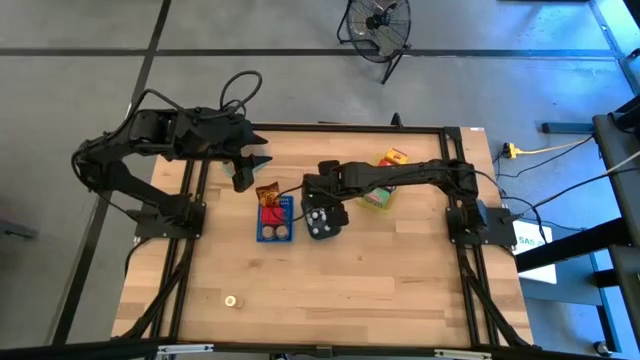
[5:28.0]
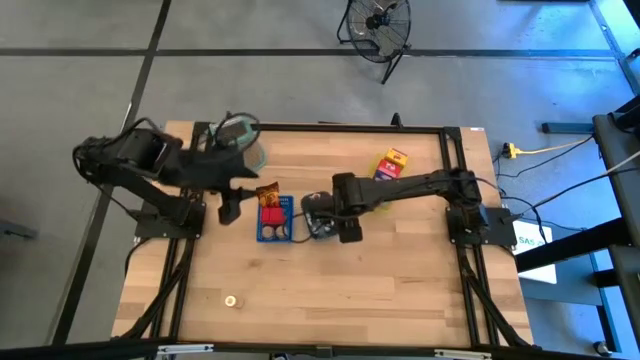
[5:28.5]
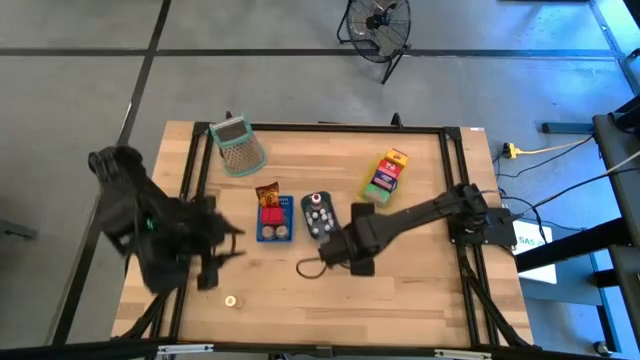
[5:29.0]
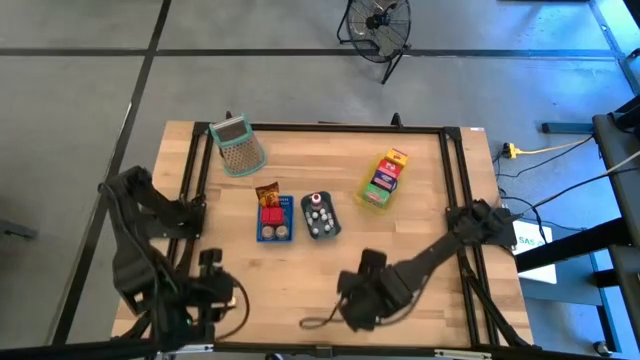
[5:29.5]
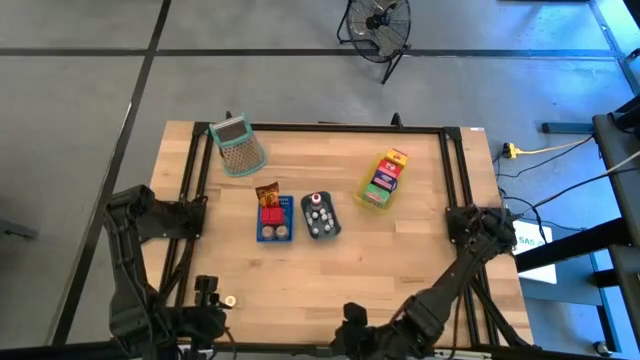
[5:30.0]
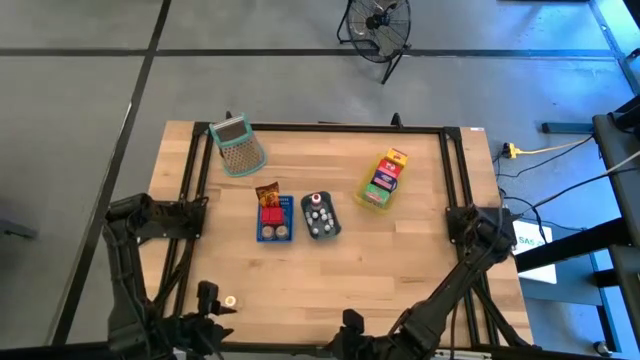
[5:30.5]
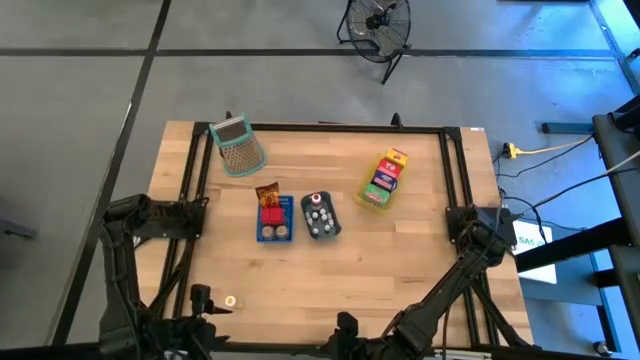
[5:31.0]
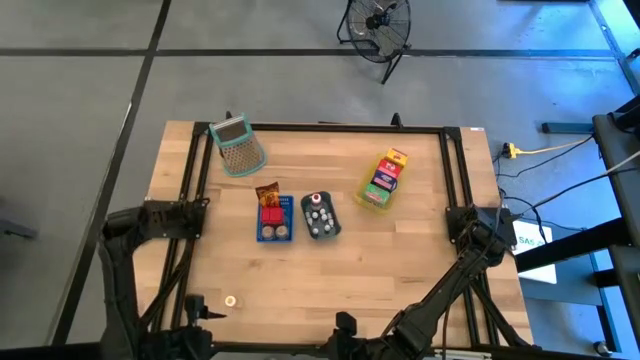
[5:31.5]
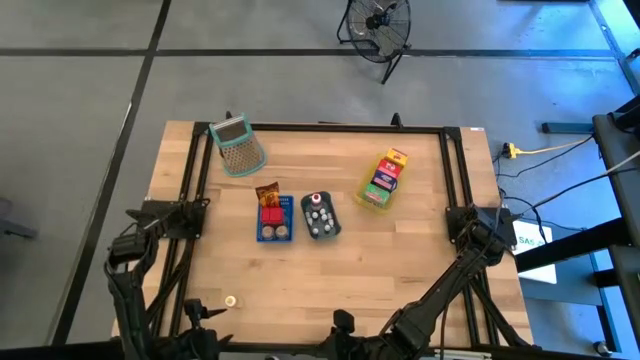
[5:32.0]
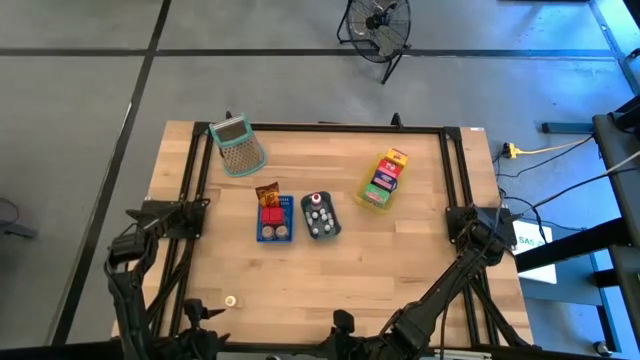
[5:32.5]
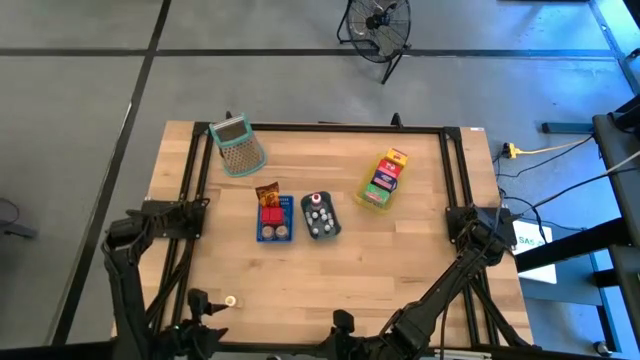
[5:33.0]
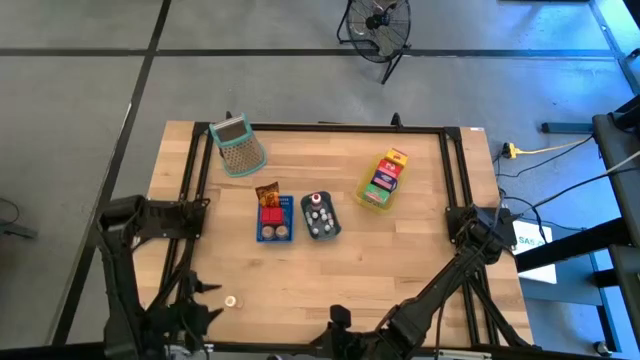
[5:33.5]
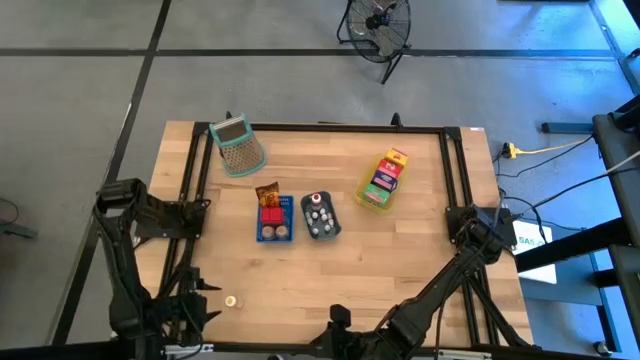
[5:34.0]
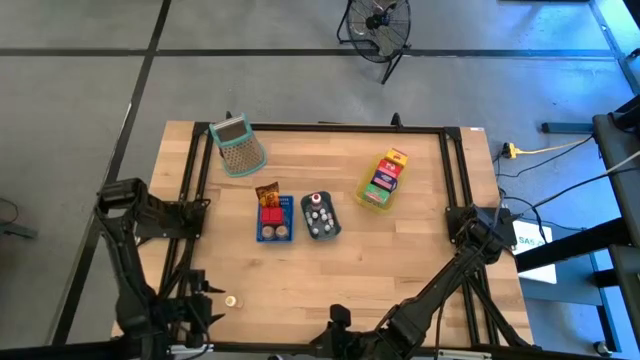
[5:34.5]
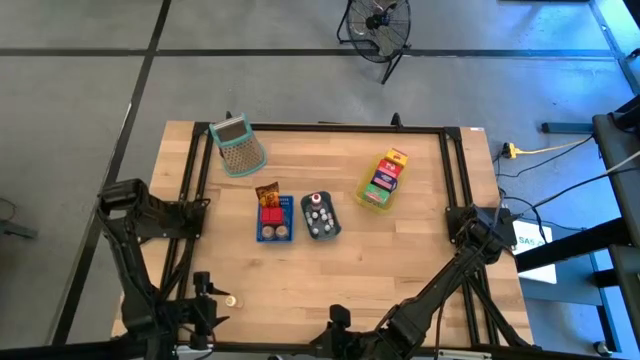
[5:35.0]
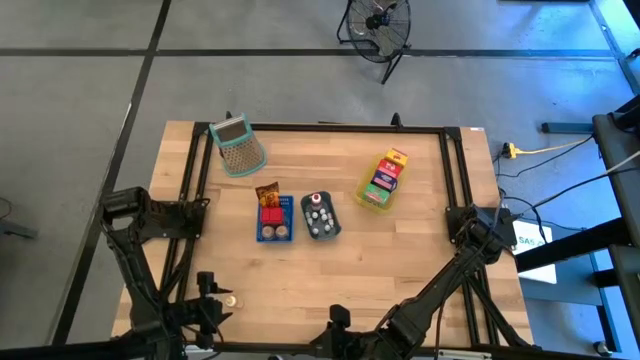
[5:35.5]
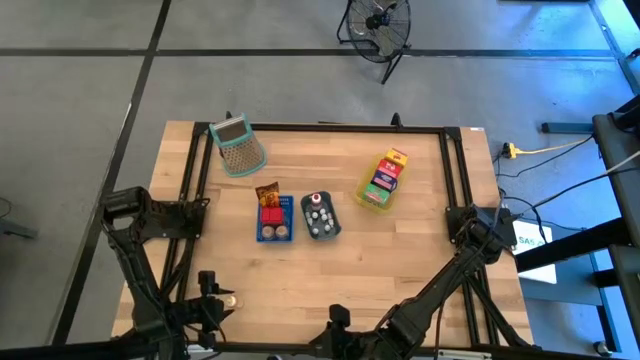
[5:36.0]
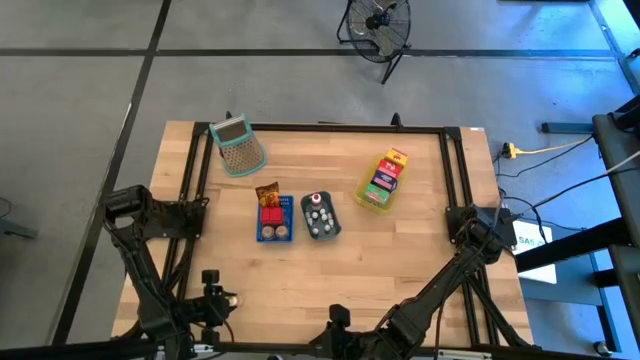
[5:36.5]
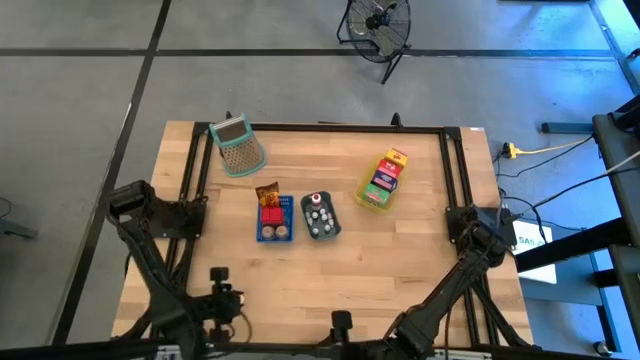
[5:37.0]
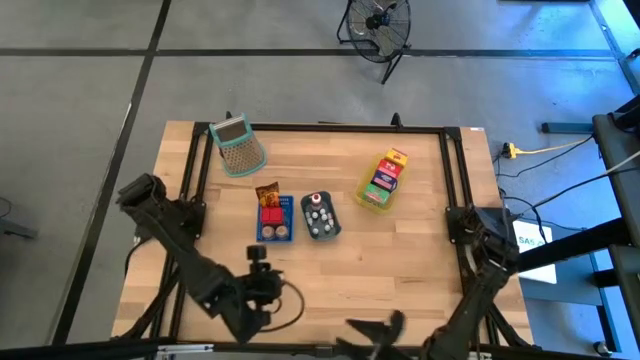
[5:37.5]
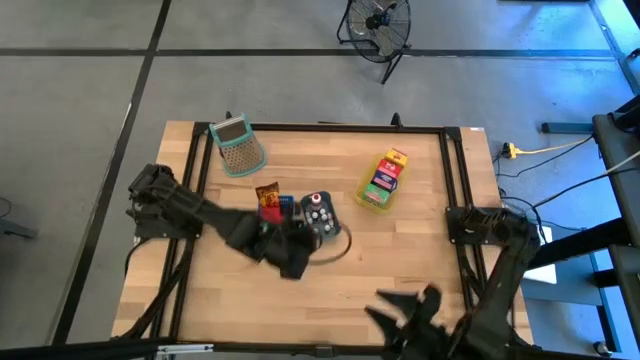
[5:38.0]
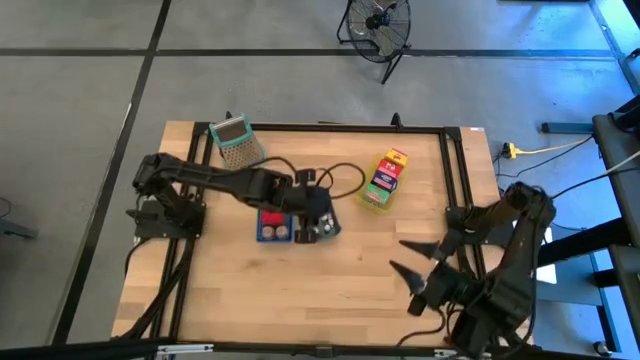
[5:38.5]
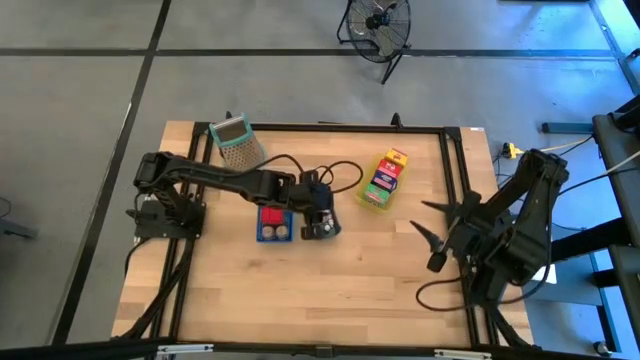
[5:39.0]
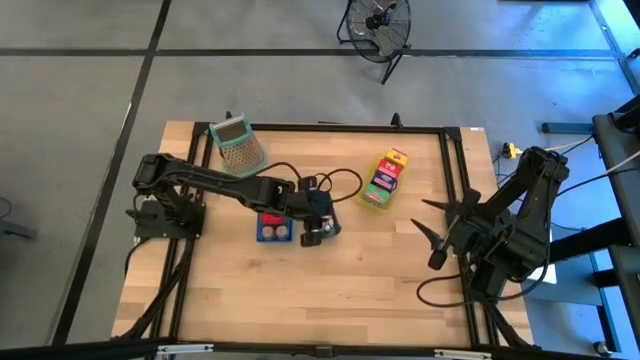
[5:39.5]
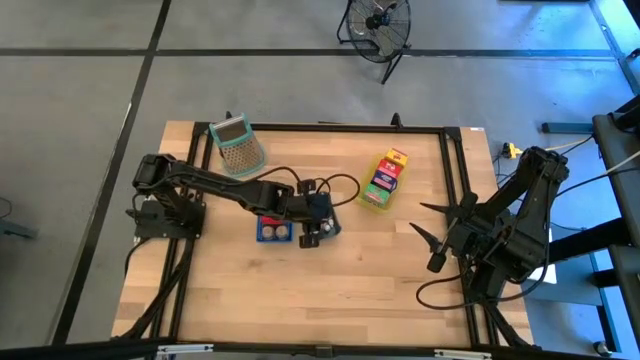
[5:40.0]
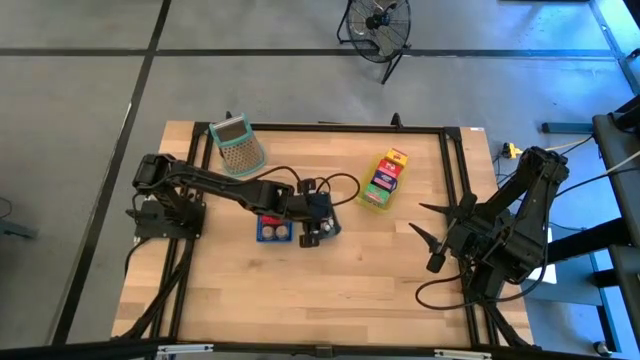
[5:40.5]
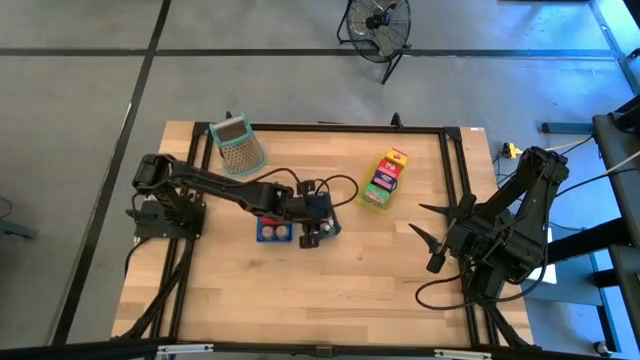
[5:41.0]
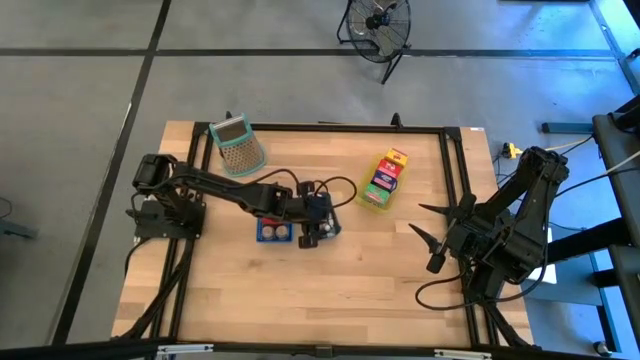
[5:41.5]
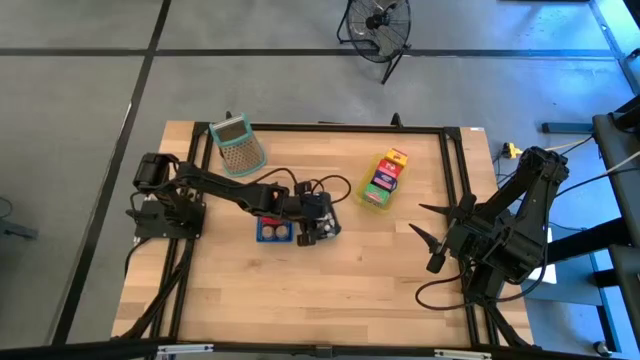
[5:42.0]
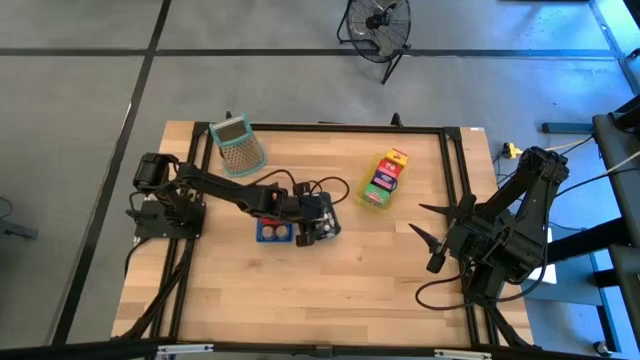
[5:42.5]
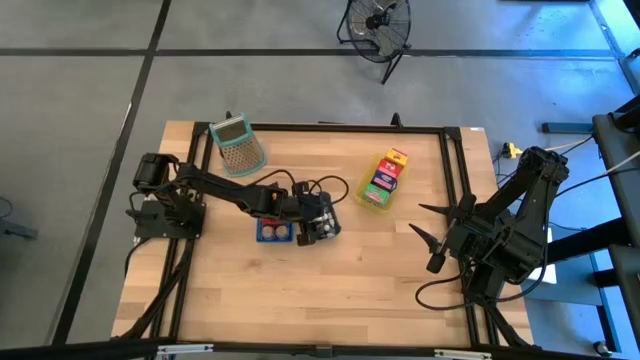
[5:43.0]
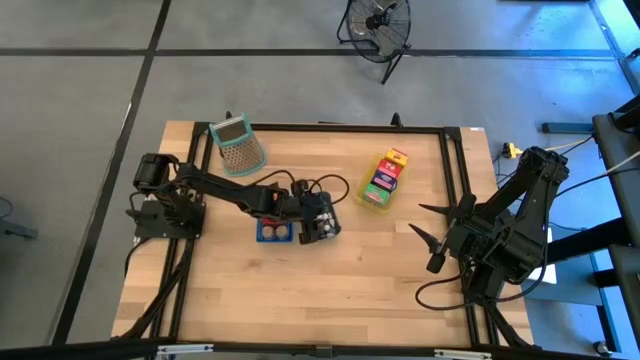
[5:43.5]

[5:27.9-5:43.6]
Task: Pick & Place Kitchen Items
Put the yellow food coloring bottle into the gray bin

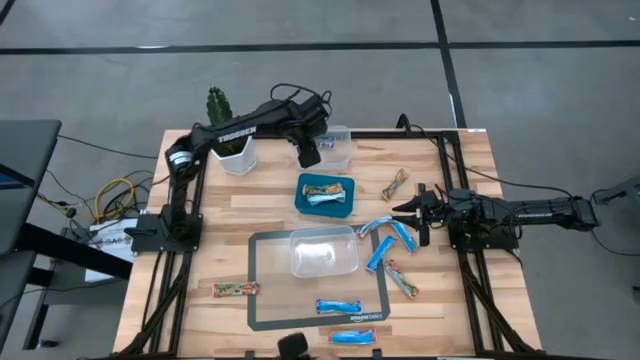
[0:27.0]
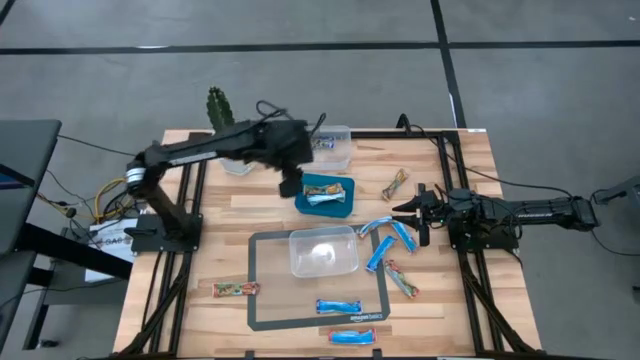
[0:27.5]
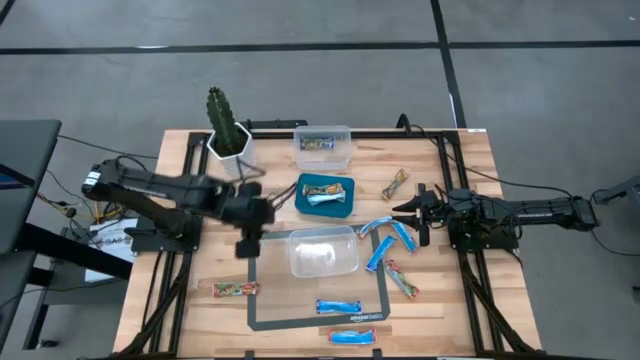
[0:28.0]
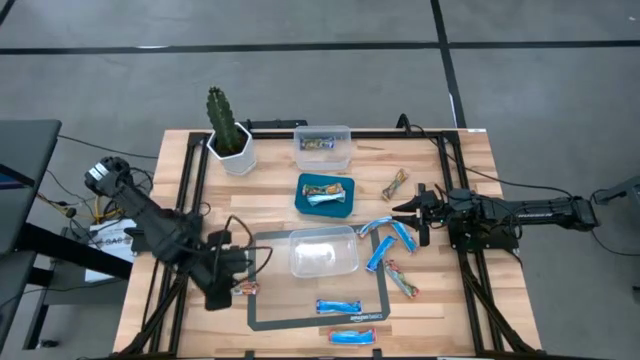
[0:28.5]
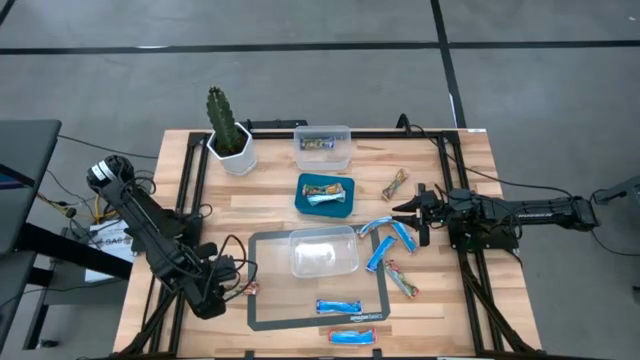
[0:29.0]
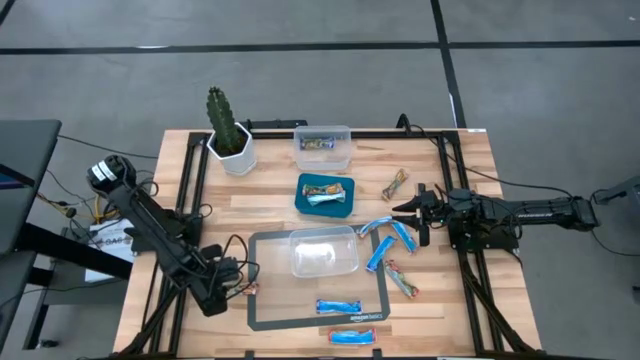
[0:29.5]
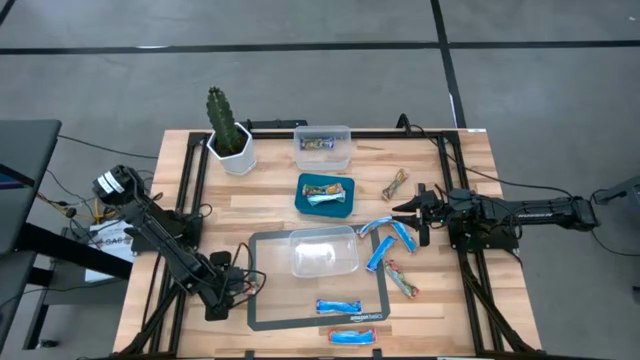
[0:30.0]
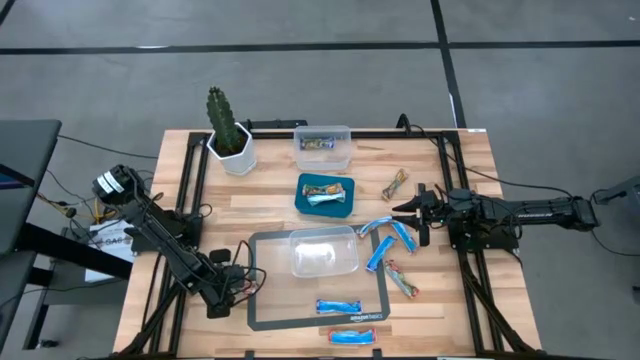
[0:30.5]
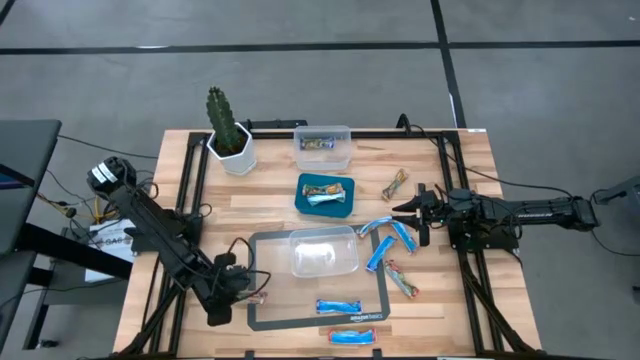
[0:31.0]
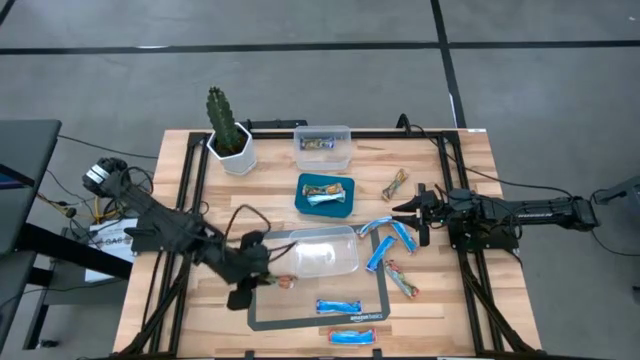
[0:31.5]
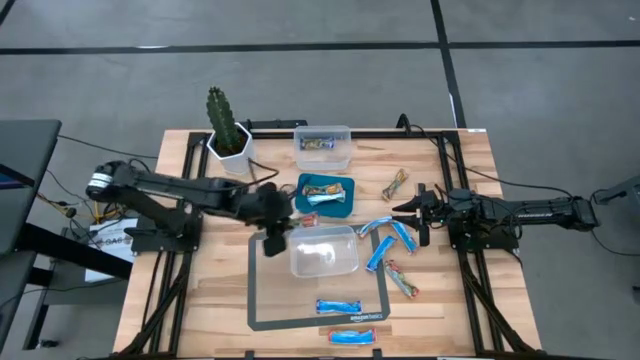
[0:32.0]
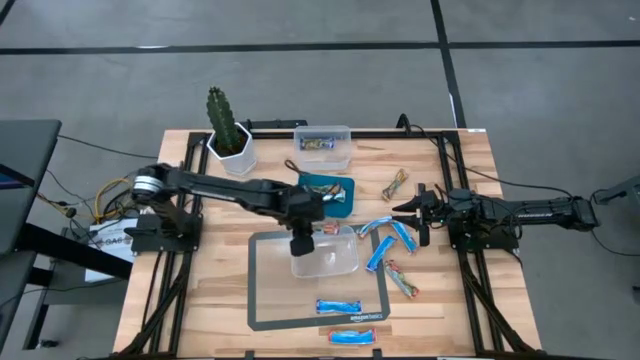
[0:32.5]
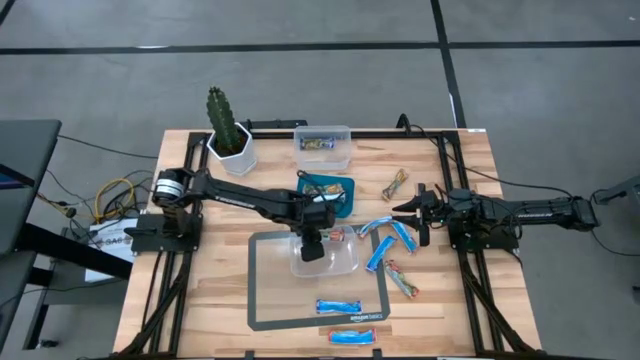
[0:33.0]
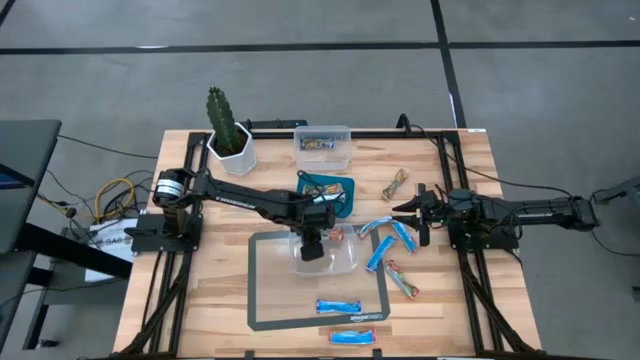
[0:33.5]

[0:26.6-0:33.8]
Task: Pick and place Granola Bars by type
Put the red granola bar into the bottom transparent bin
